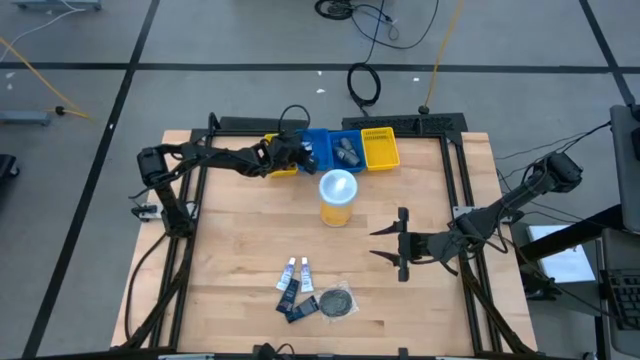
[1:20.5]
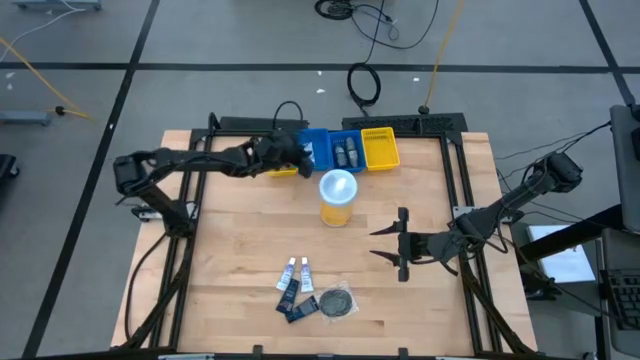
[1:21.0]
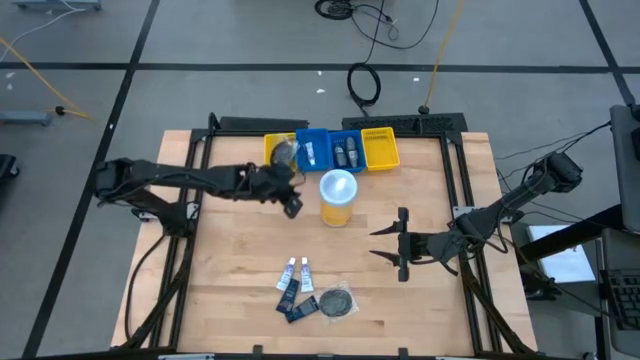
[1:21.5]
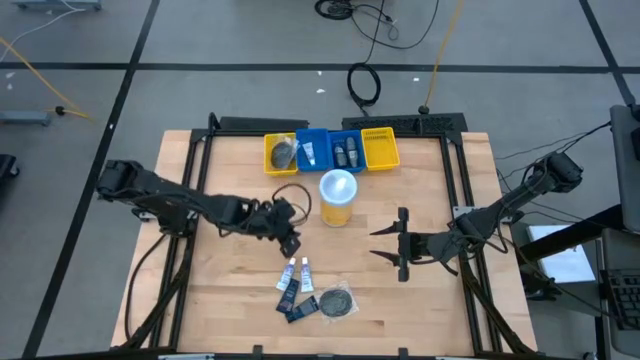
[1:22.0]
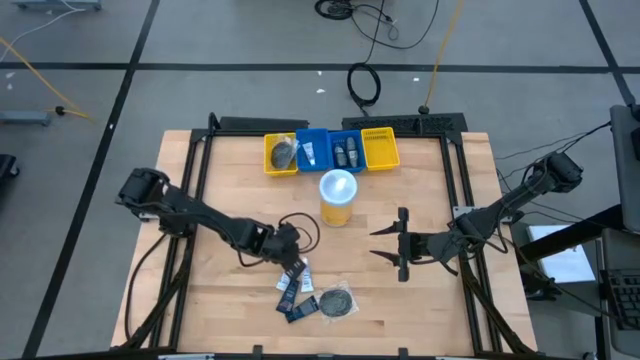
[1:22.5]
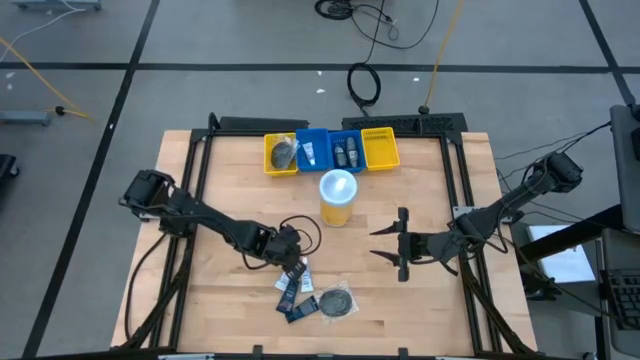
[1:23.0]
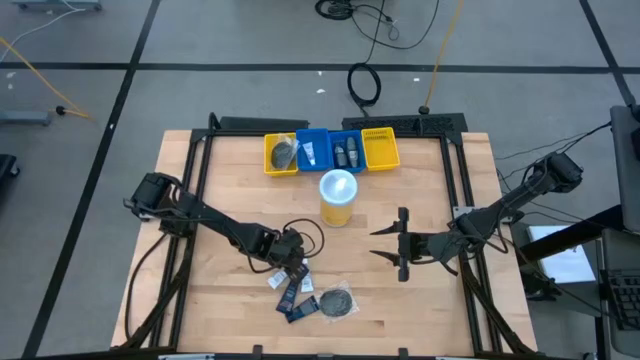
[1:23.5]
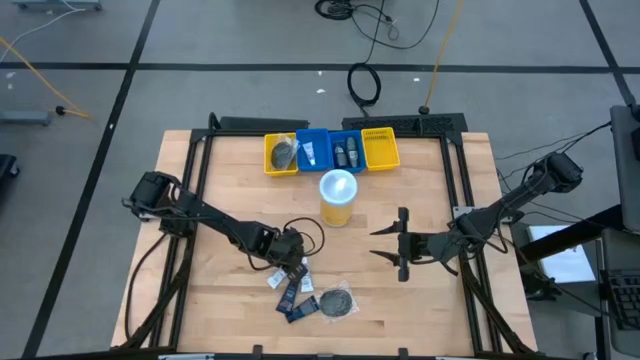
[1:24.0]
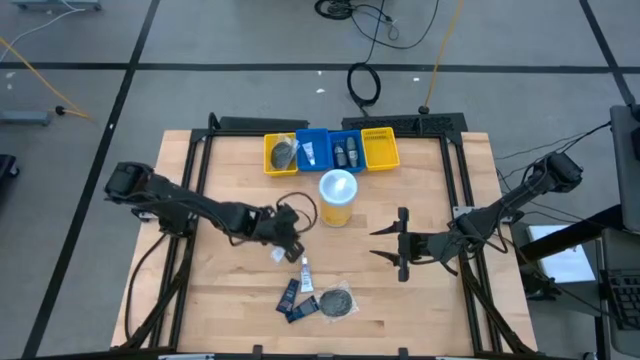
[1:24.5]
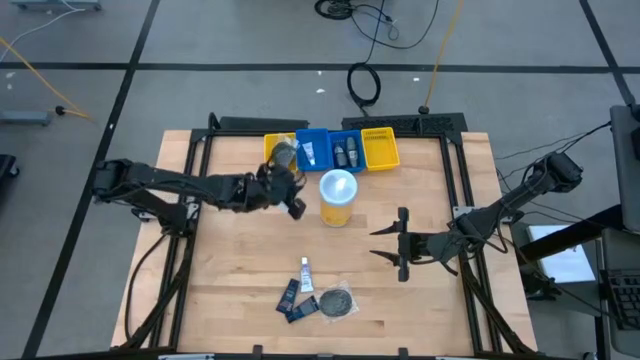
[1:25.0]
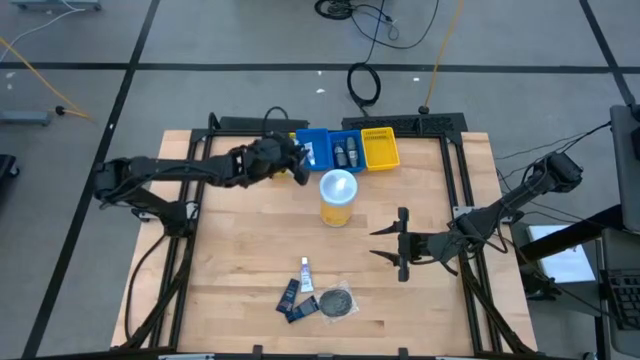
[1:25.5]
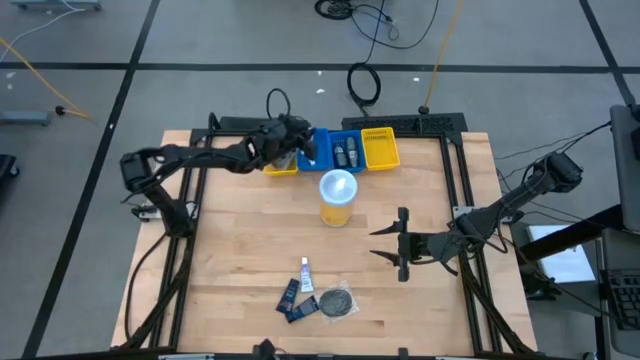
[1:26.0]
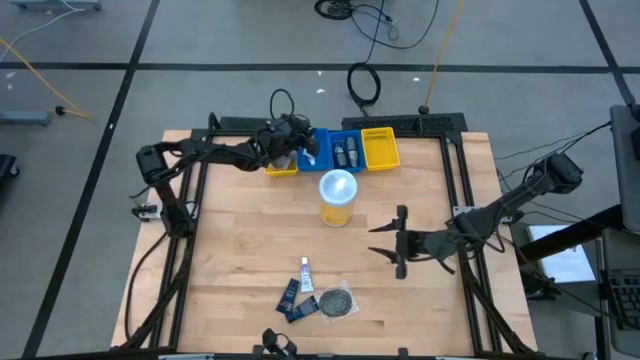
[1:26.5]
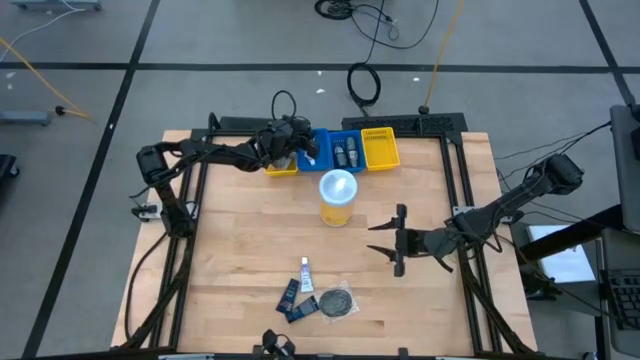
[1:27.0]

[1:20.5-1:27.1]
Task: Pick & Place Travel size toiletries
Put the toothpaste into the left blue basket

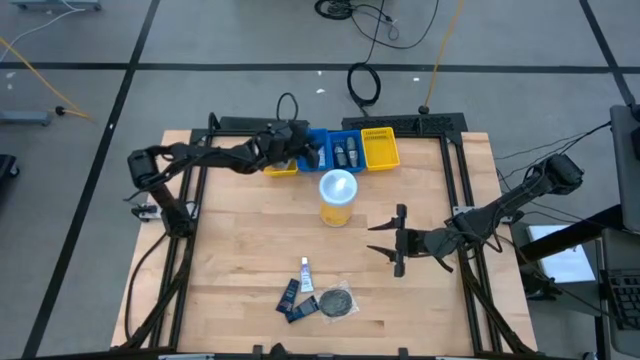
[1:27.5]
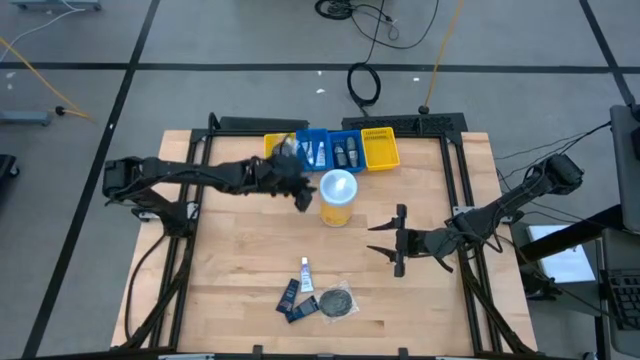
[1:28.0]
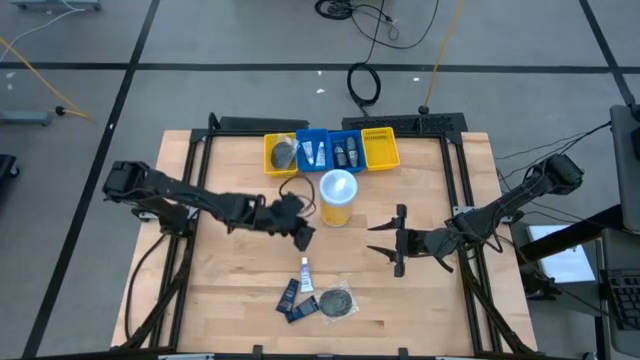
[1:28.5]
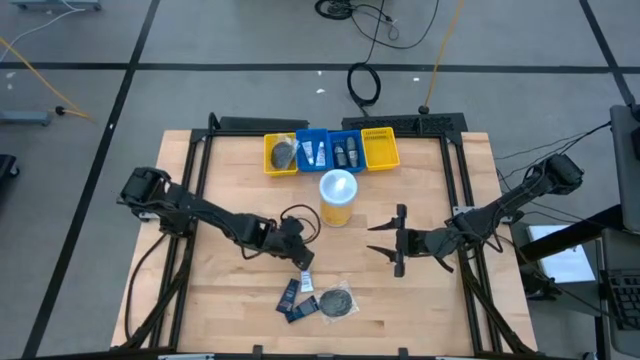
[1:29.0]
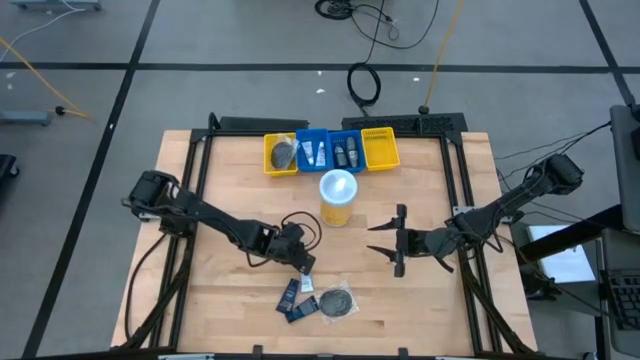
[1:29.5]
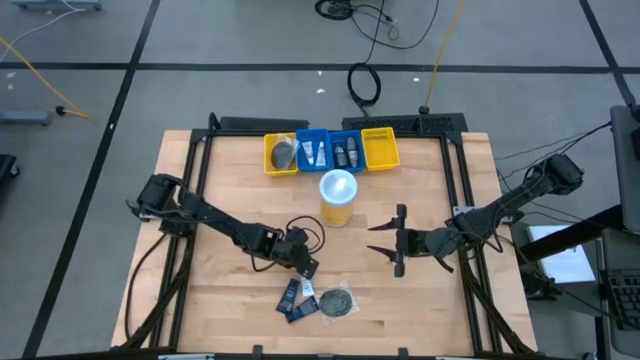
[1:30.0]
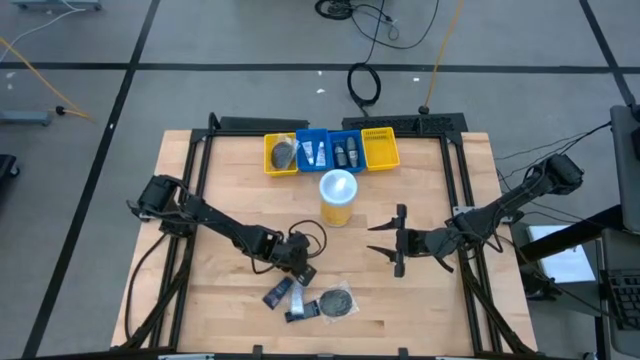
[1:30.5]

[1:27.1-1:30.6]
Put the toothpaste into the left blue basket

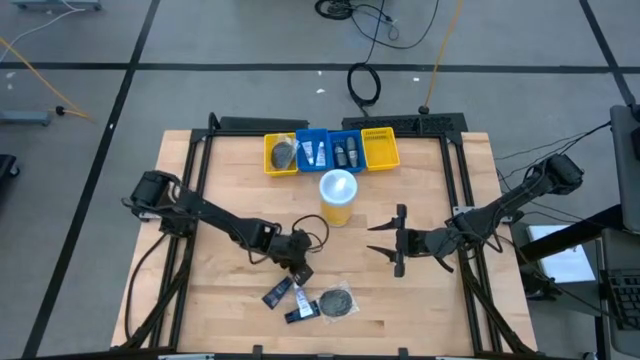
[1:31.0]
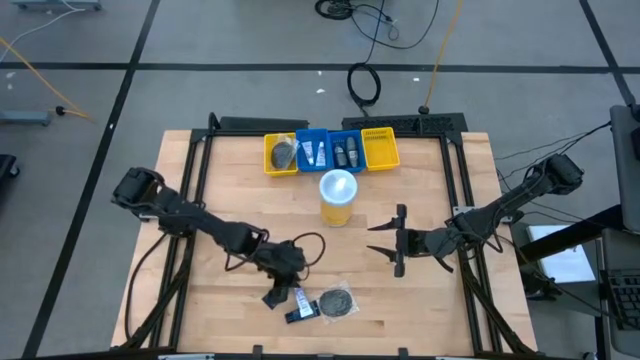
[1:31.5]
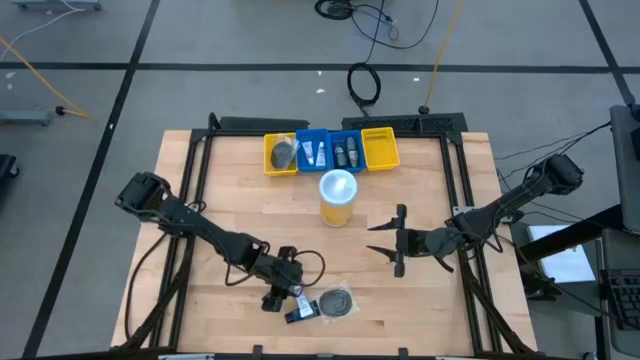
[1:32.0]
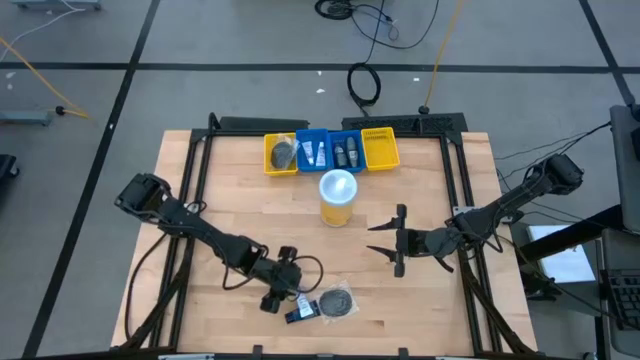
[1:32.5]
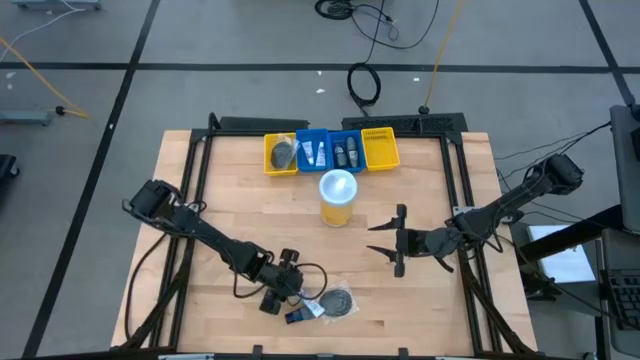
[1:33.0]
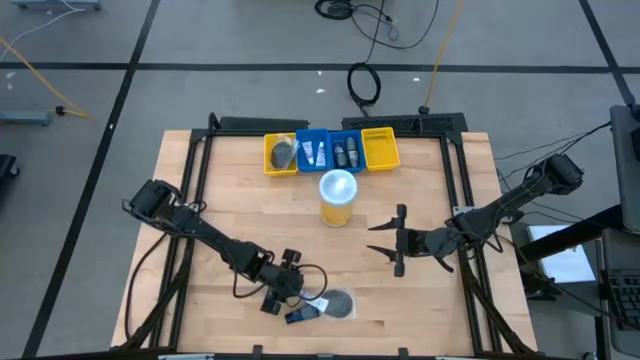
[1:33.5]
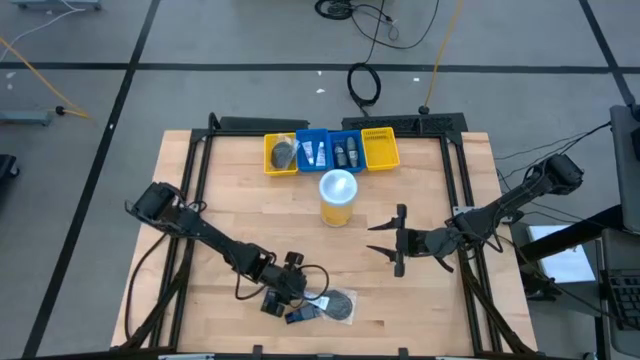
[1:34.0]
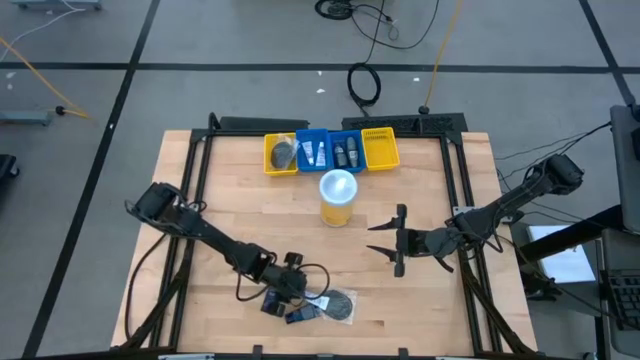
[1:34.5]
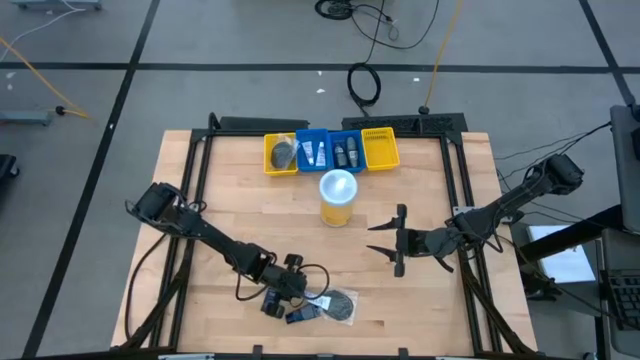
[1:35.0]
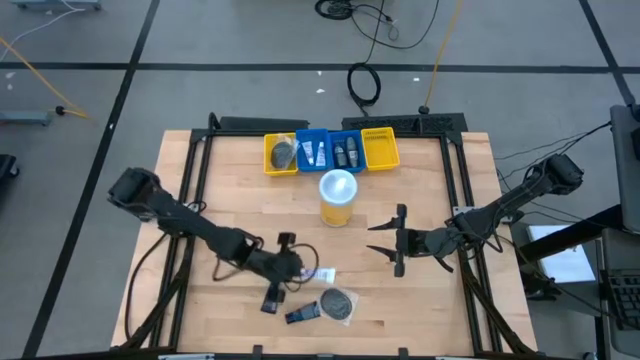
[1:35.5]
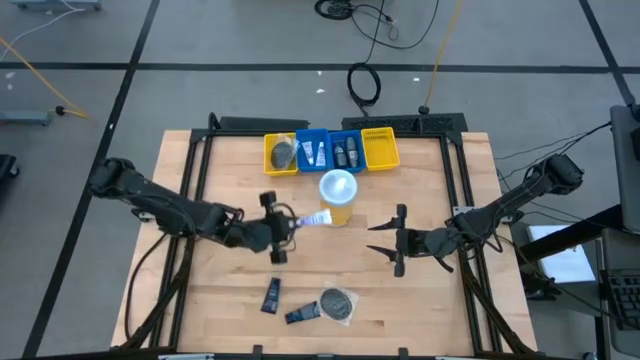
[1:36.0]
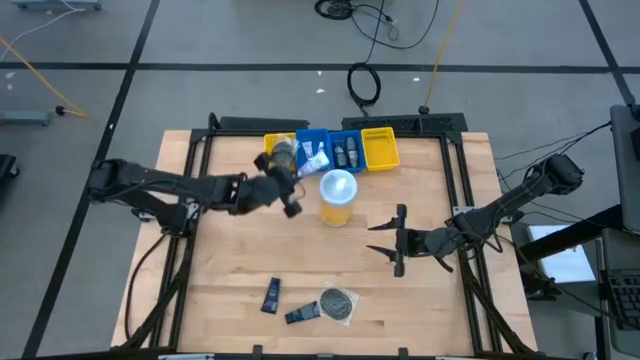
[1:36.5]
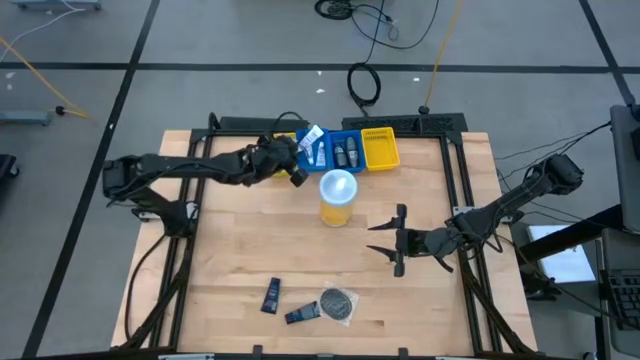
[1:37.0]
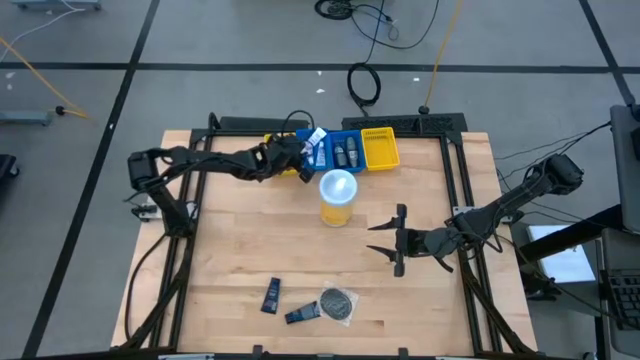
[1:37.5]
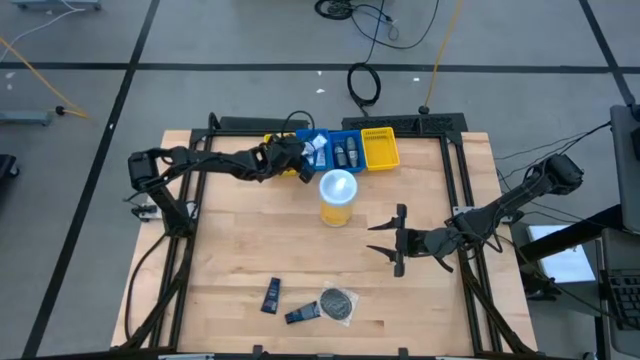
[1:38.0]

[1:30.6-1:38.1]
Put the toothpaste into the left blue basket

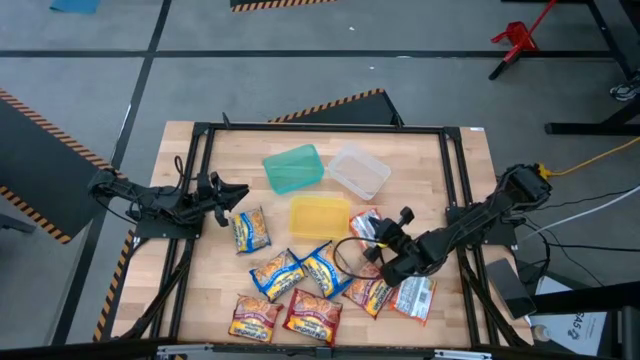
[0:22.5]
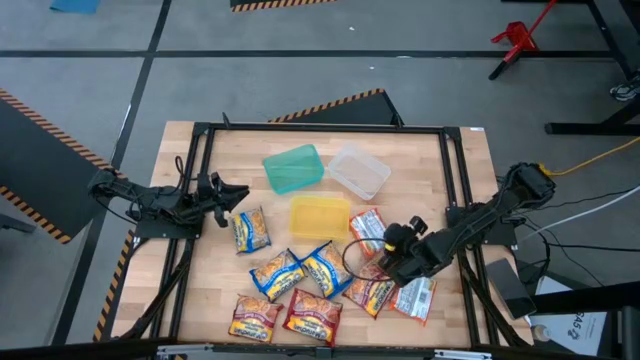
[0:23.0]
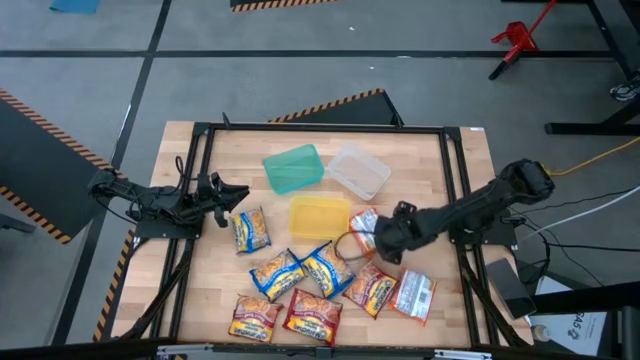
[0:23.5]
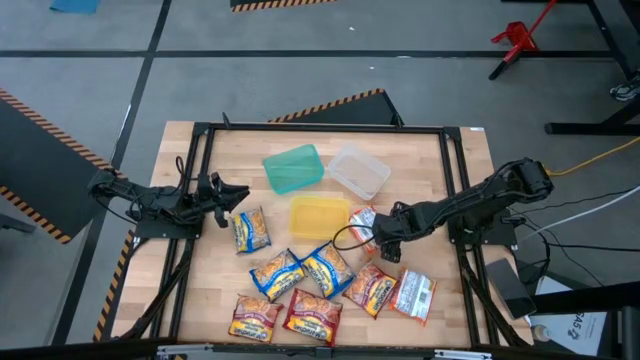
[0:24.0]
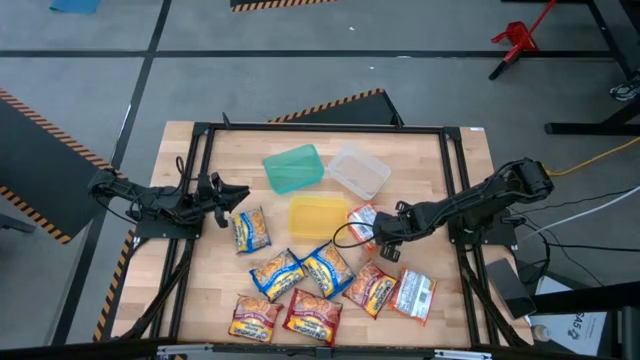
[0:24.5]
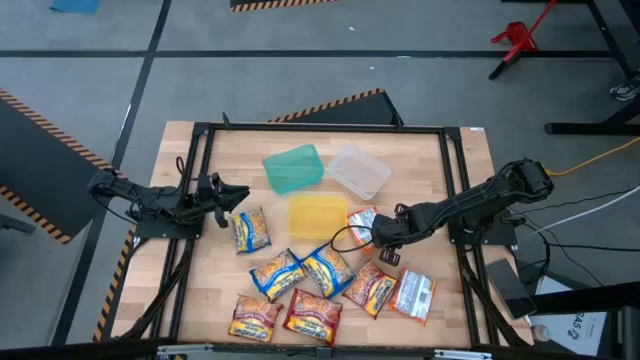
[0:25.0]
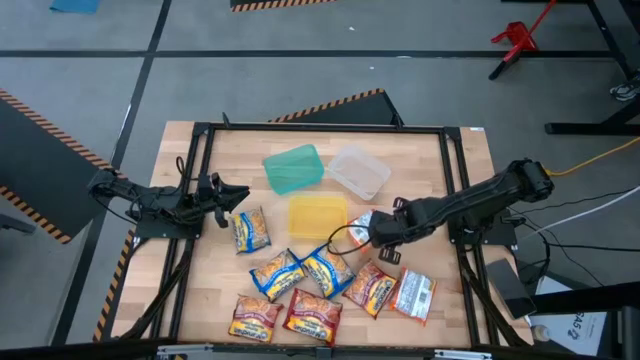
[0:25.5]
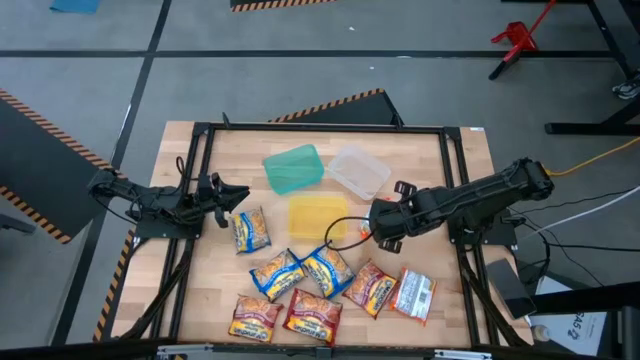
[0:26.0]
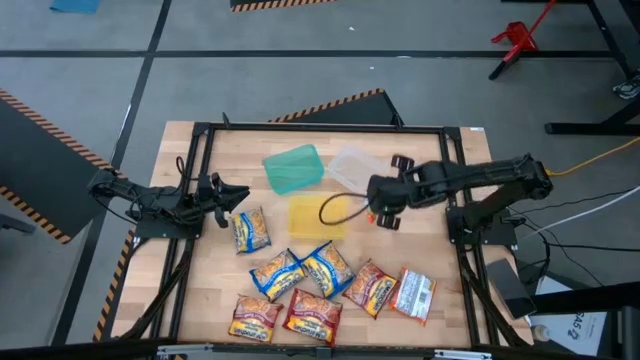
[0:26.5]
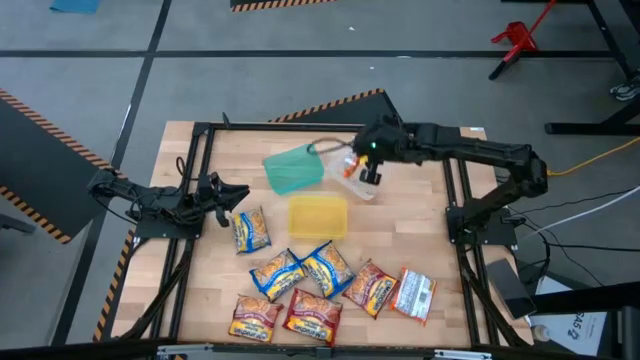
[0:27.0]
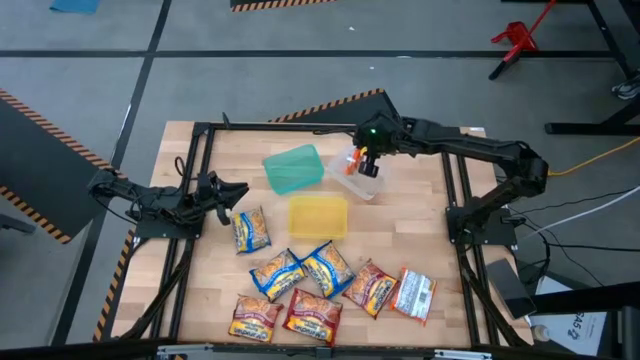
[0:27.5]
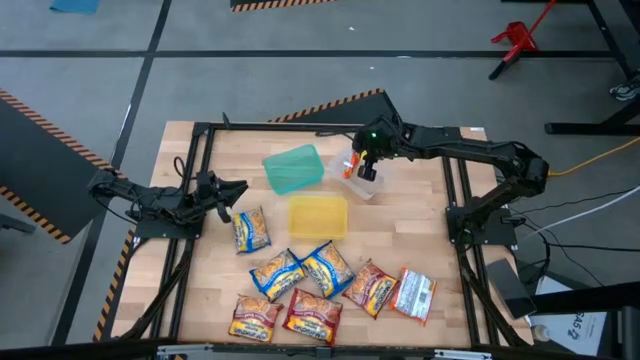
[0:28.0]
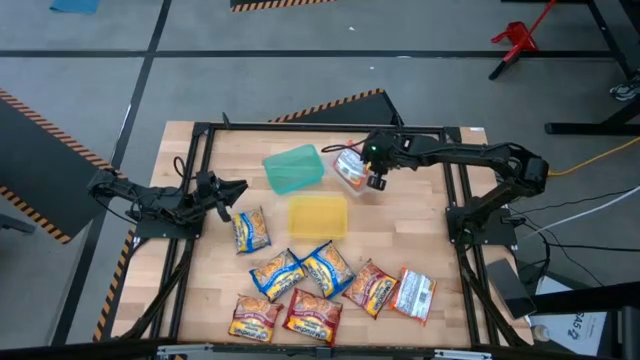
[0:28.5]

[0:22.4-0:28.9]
Task: Sort Maruchan noodles
Put the top orange noodle pack into the white bin
